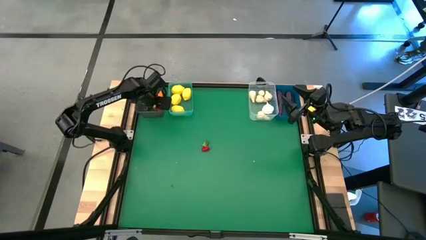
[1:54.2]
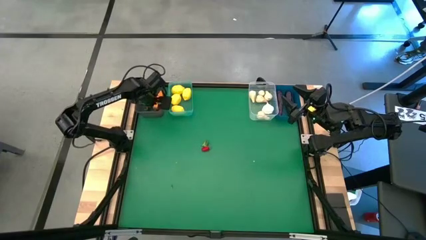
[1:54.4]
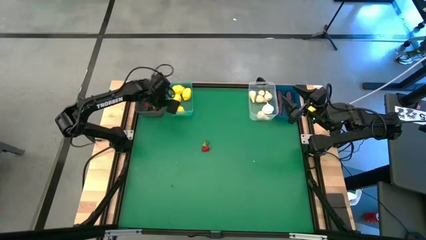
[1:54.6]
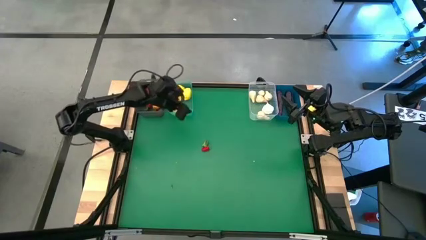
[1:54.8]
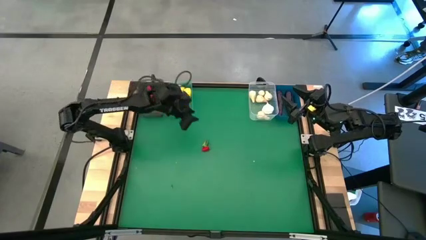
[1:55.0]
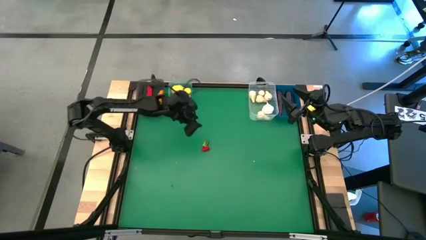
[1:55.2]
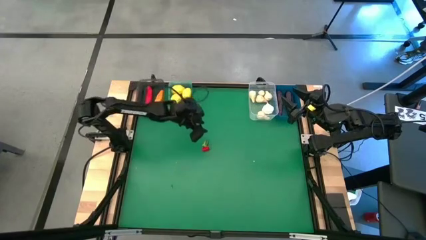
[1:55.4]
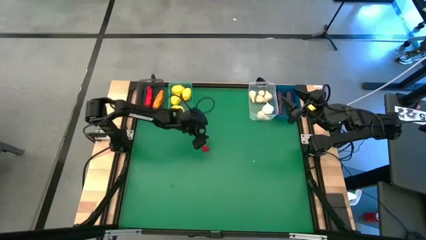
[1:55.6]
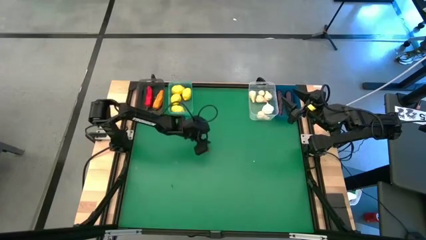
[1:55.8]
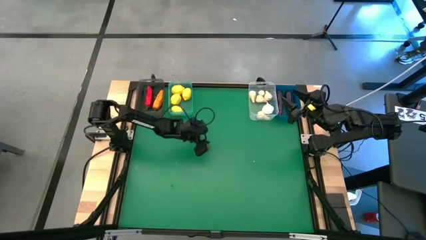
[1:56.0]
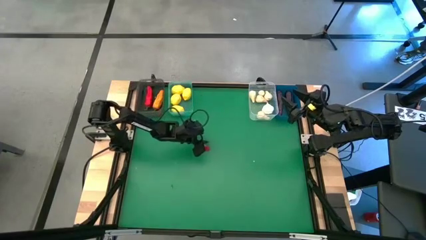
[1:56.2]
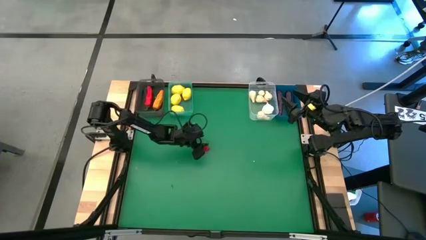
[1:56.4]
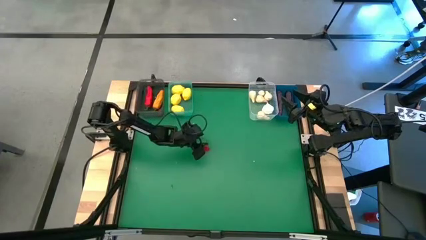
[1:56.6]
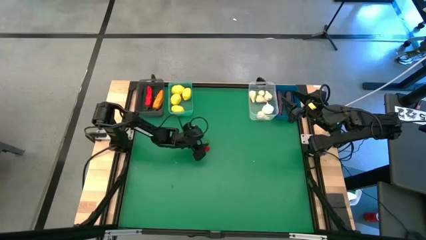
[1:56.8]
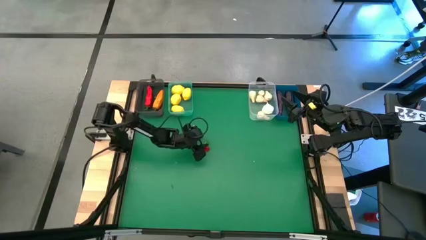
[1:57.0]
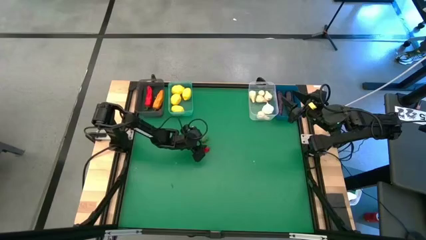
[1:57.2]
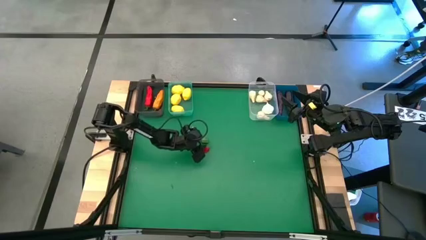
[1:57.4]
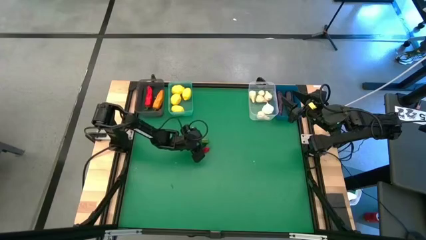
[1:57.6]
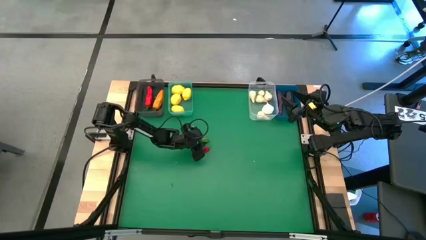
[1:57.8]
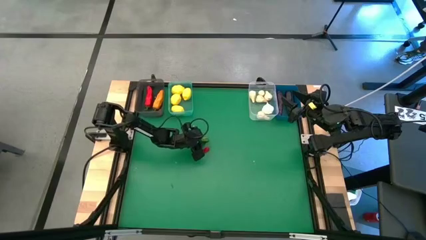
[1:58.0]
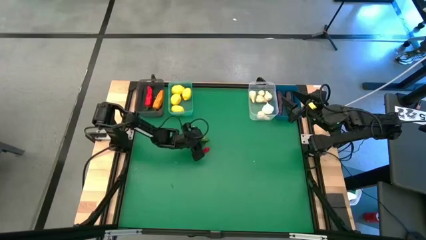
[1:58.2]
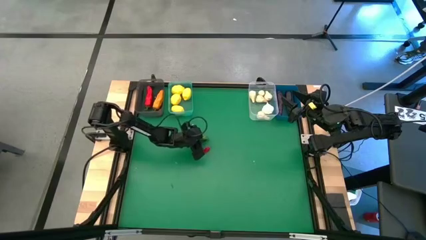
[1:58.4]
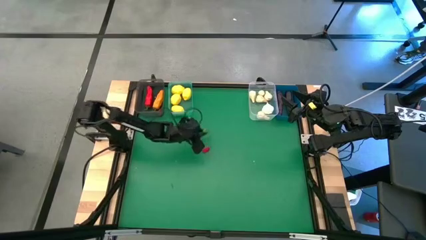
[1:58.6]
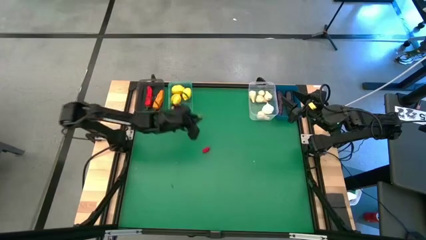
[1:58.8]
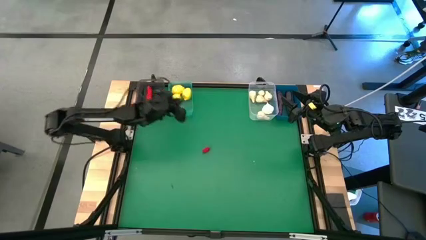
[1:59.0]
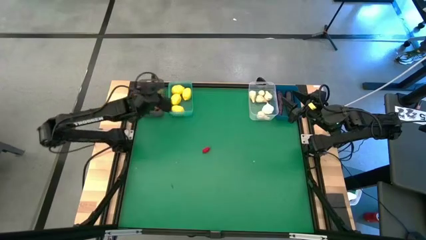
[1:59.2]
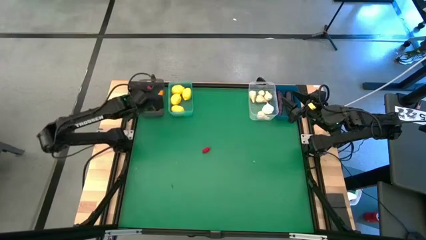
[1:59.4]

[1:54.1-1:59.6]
Task: Sort produce into baskets
Put the green pepper into the black bin

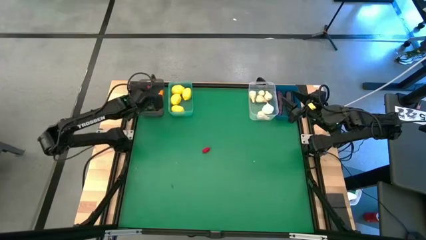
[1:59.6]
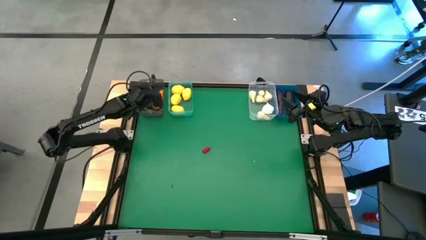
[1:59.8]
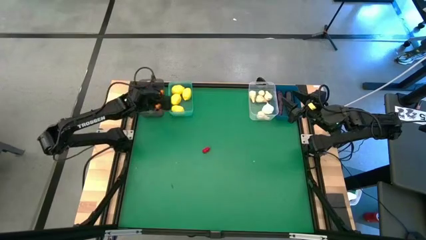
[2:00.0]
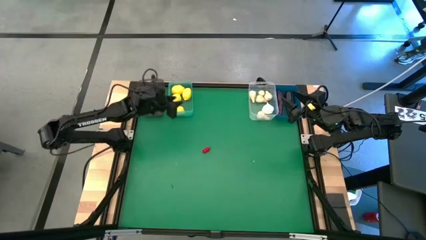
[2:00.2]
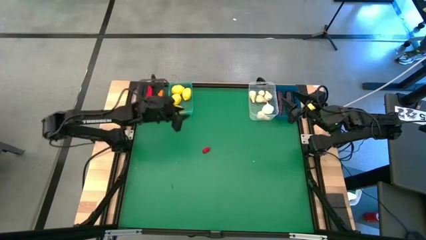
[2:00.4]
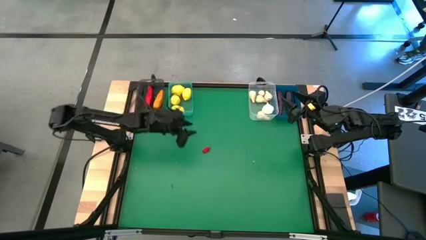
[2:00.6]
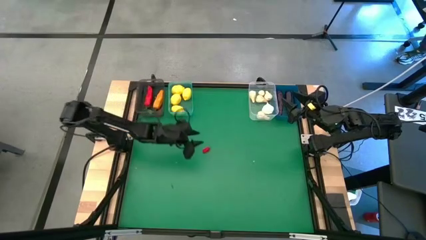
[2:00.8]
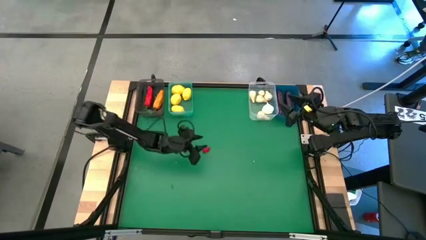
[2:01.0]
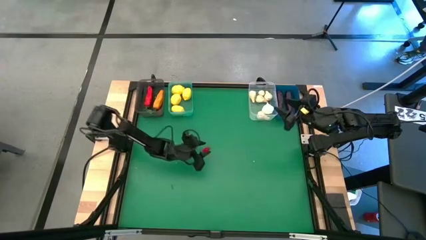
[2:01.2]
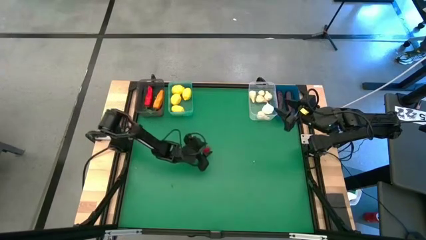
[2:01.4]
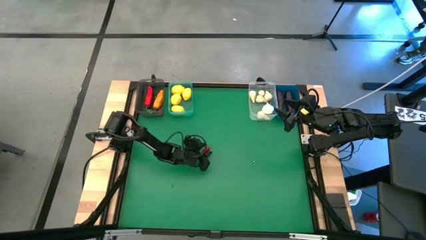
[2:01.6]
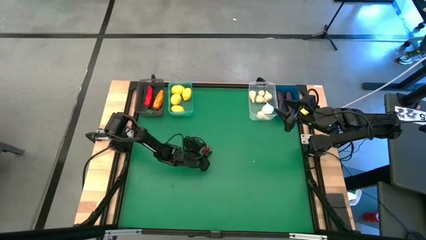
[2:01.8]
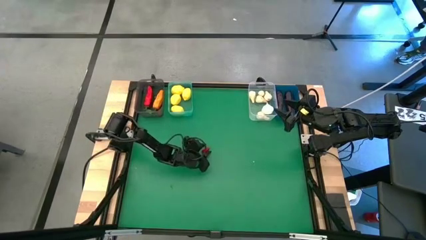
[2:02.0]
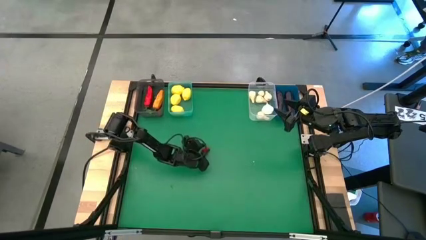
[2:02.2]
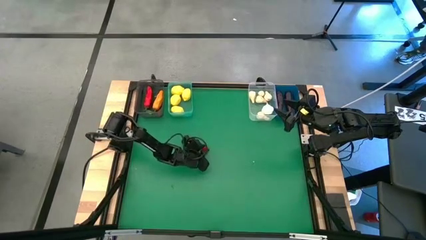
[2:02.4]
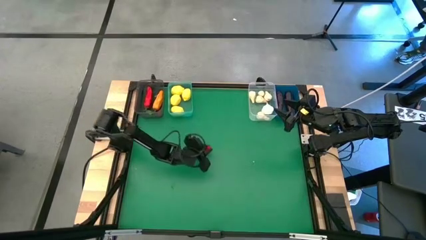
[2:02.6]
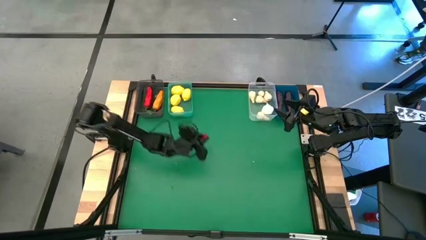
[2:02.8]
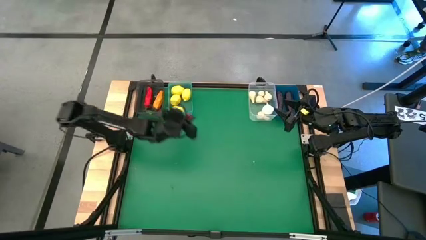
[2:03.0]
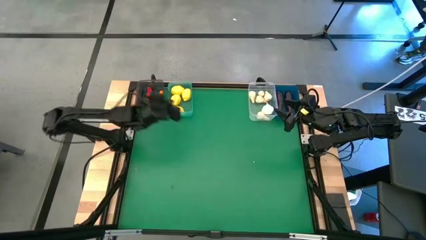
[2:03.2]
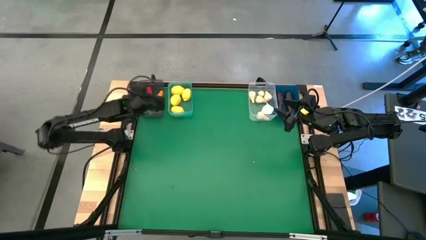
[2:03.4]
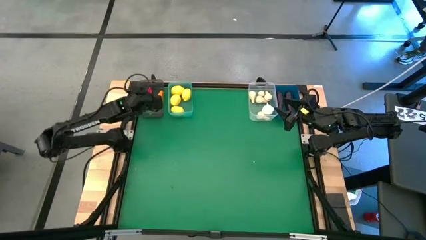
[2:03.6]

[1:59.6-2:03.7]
Put the red pepper into the black bin

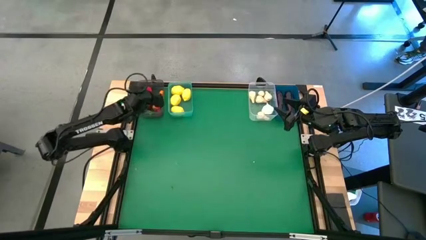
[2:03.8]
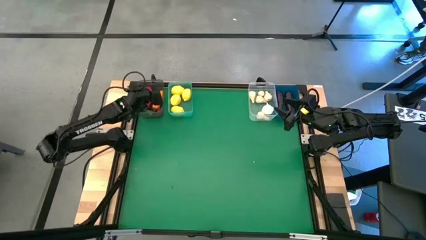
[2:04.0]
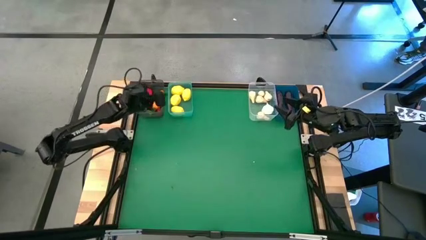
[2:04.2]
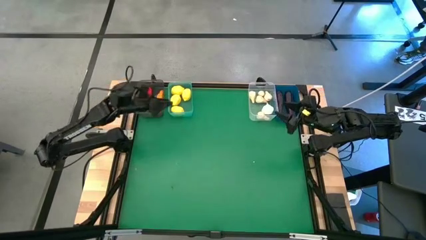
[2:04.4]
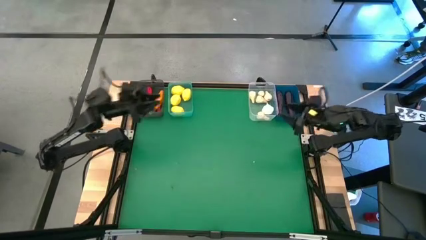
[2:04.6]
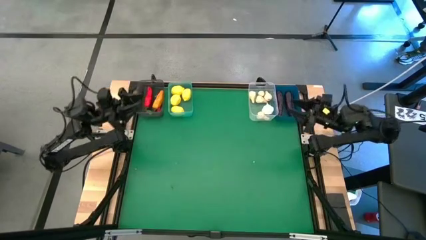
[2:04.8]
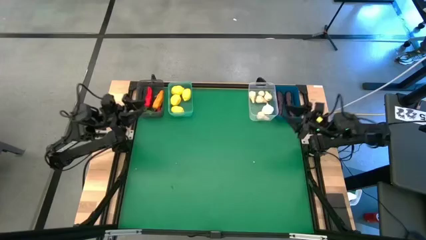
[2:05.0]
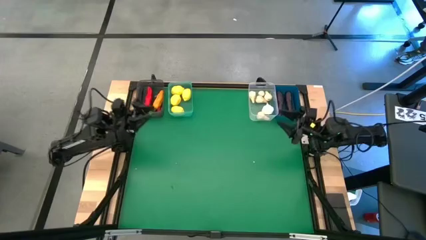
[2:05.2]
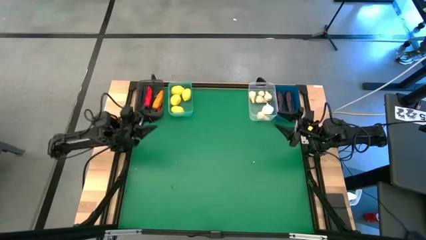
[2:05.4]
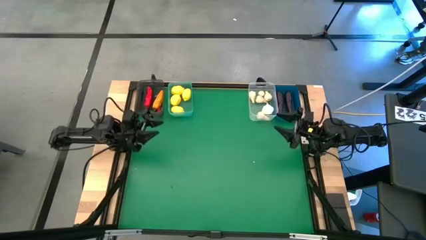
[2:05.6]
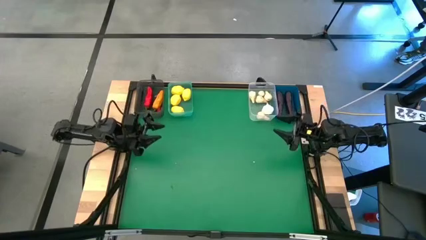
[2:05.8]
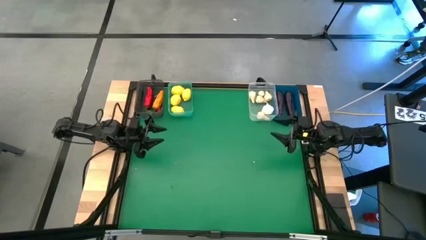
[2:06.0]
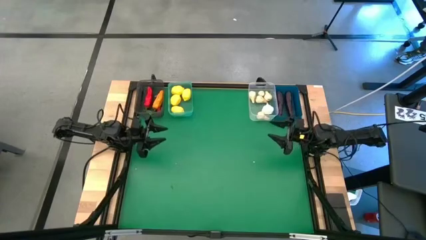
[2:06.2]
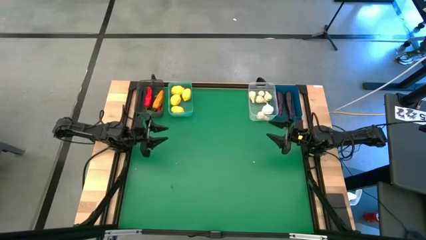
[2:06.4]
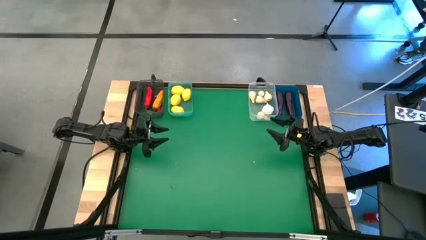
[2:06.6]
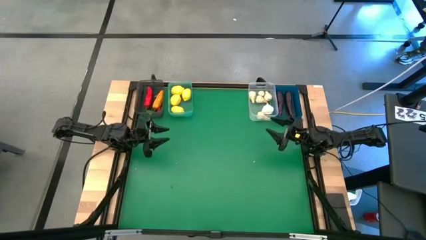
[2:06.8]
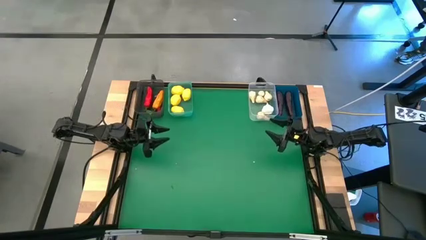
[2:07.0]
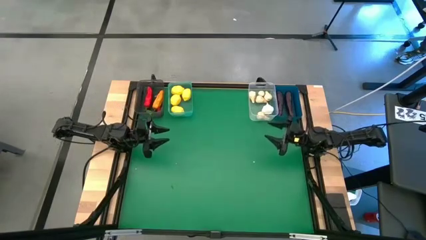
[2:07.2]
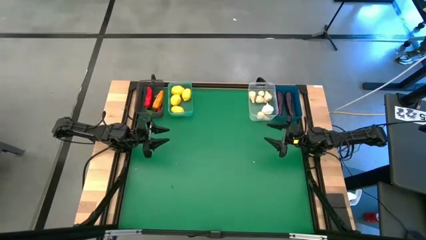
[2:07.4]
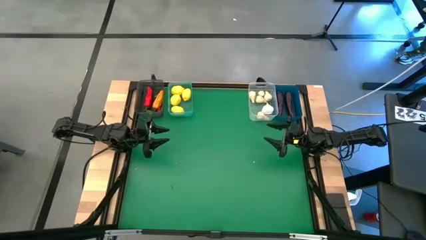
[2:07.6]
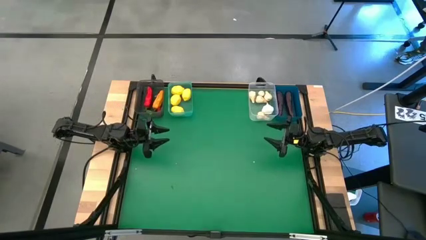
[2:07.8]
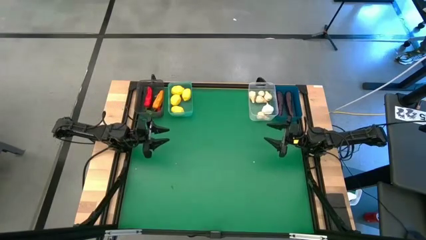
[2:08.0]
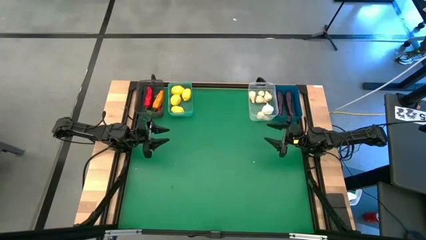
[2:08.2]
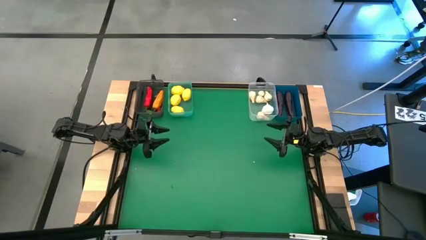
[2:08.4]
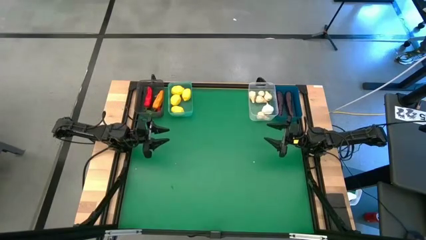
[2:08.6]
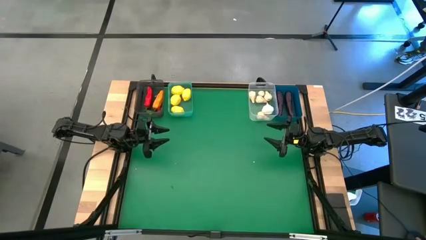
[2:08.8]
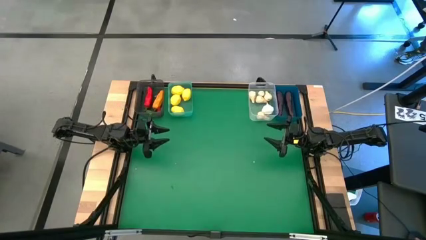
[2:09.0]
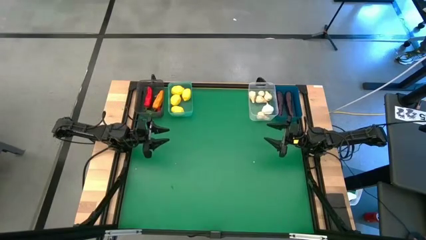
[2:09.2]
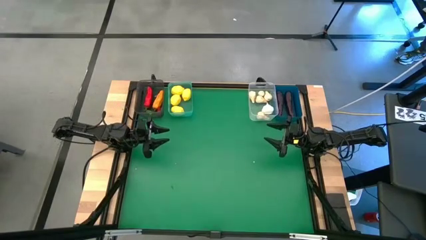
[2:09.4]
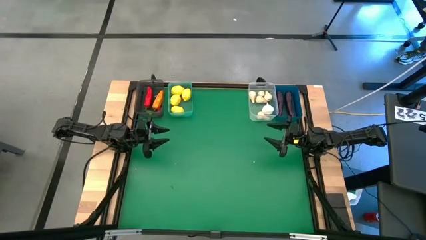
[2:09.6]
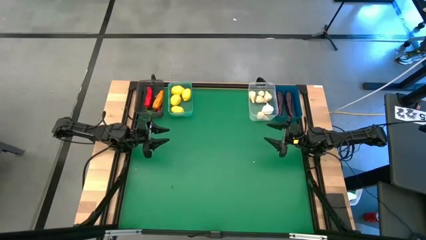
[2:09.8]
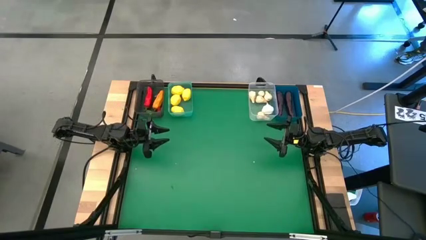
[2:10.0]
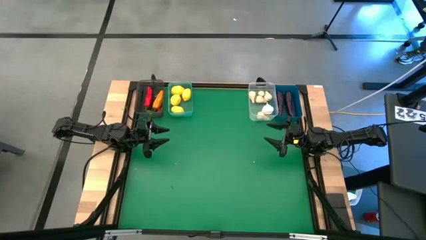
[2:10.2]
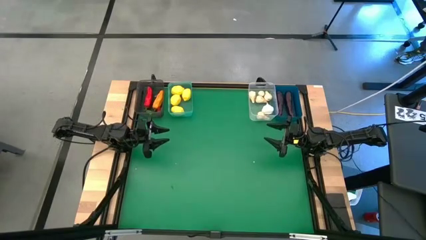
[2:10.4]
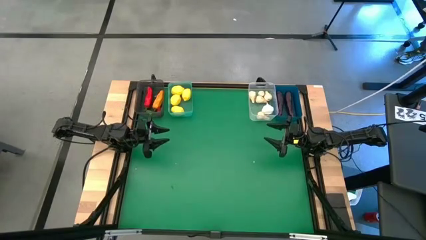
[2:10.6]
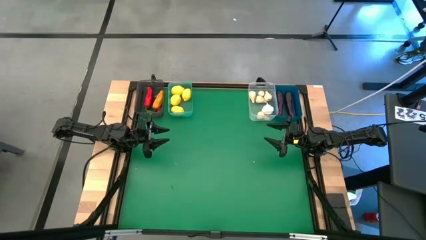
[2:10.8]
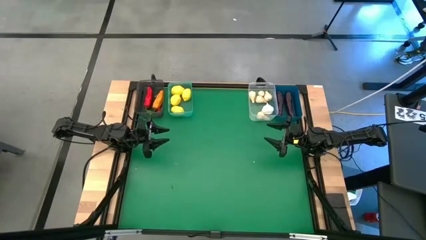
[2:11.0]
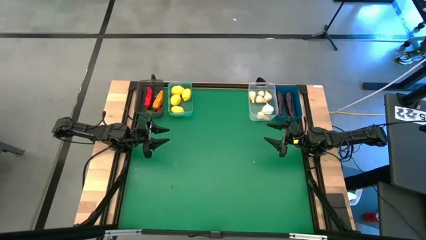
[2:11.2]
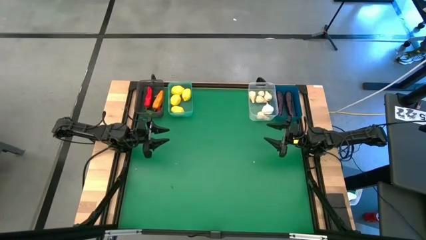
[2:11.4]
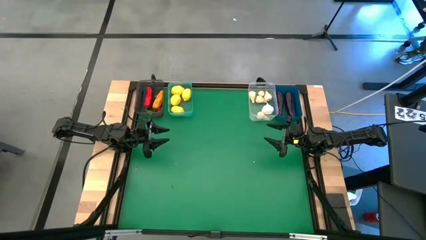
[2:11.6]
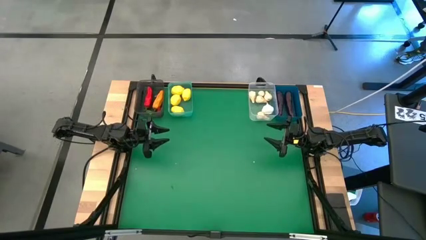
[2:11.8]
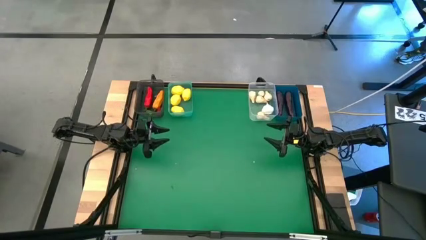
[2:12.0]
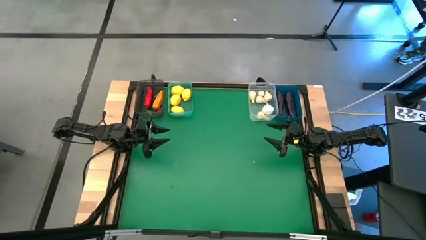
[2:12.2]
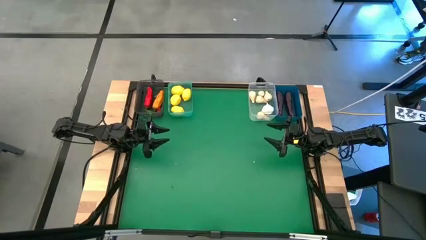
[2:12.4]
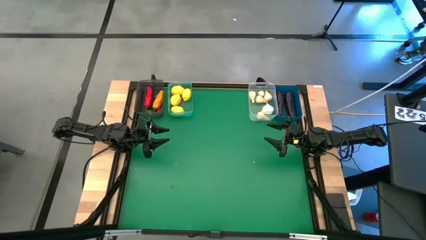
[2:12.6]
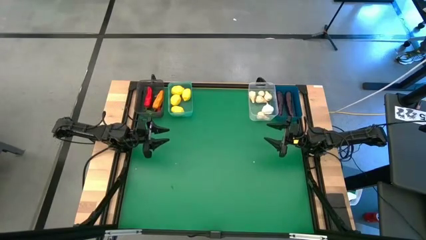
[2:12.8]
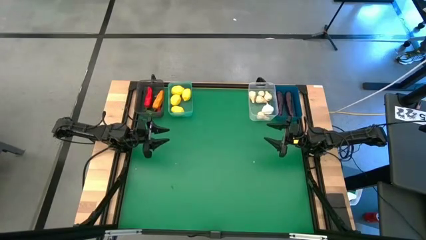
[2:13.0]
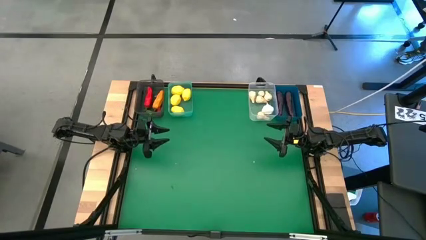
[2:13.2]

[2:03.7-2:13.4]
Return to Home Position
